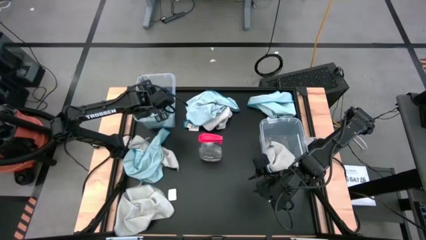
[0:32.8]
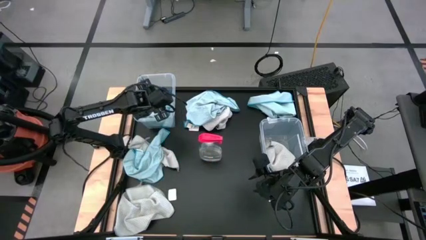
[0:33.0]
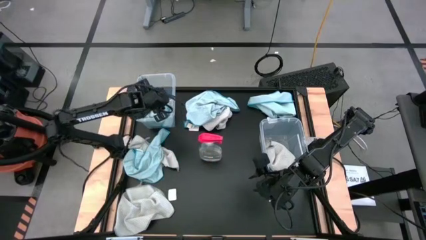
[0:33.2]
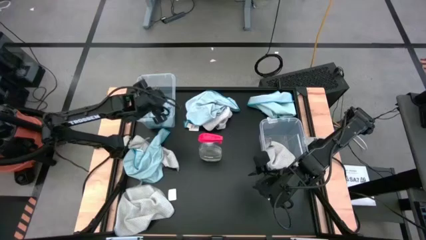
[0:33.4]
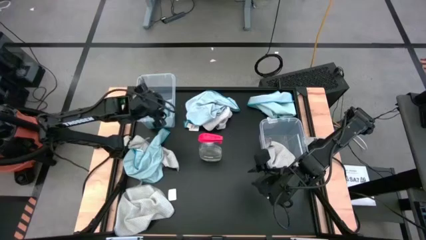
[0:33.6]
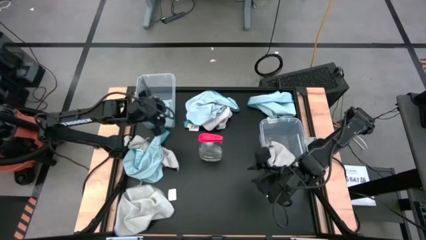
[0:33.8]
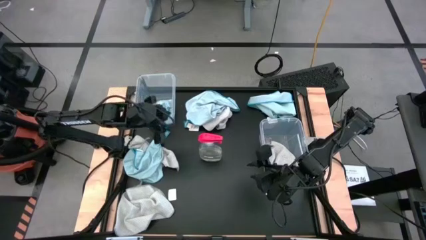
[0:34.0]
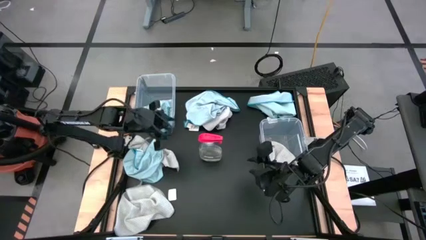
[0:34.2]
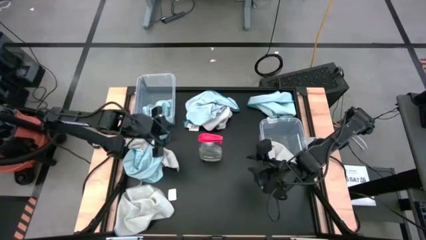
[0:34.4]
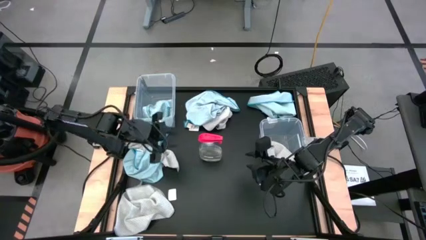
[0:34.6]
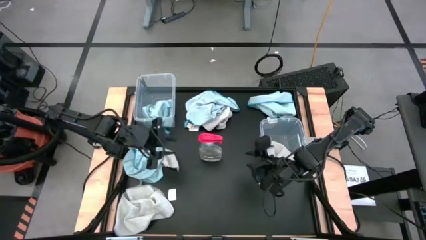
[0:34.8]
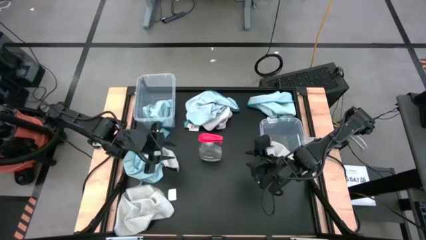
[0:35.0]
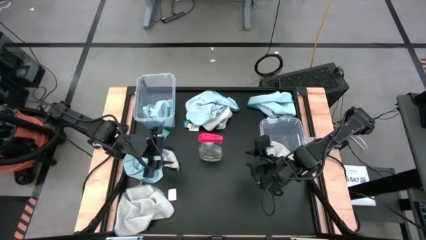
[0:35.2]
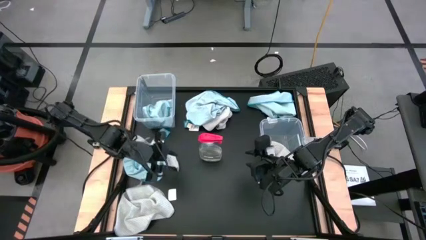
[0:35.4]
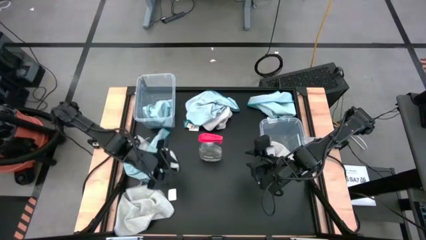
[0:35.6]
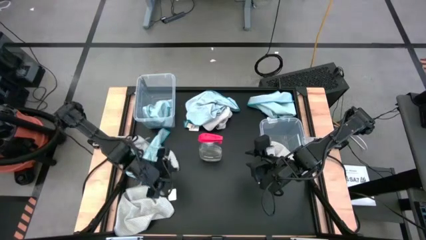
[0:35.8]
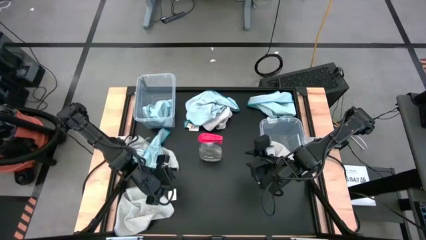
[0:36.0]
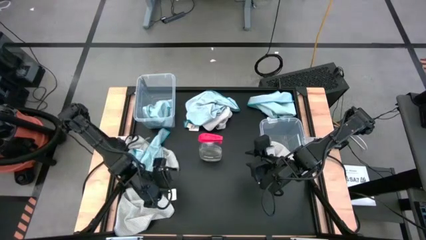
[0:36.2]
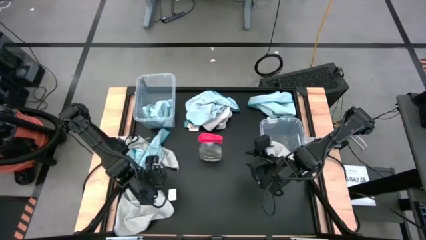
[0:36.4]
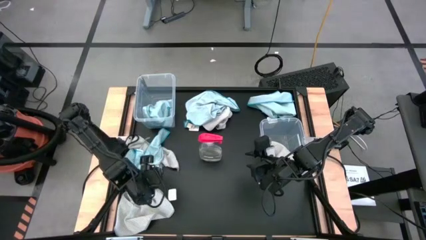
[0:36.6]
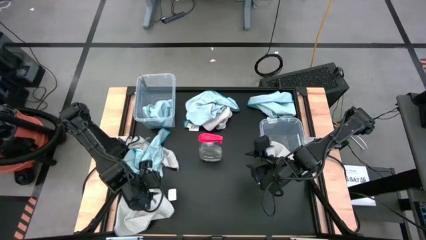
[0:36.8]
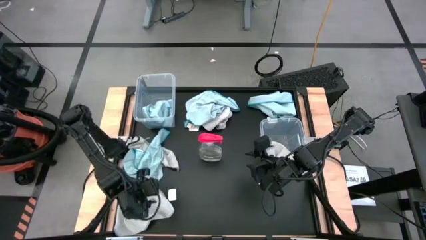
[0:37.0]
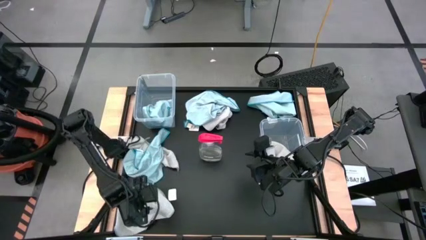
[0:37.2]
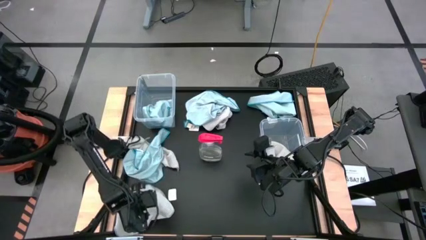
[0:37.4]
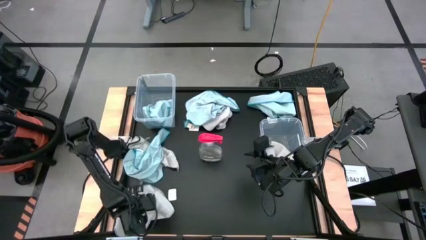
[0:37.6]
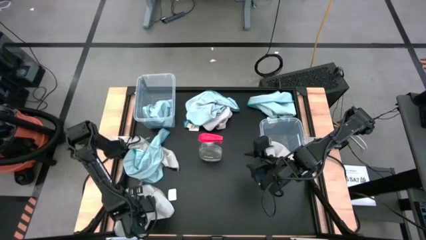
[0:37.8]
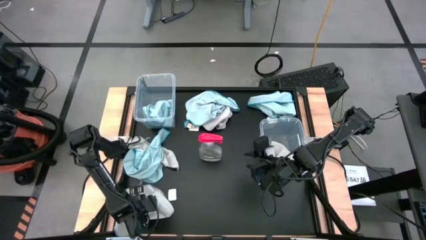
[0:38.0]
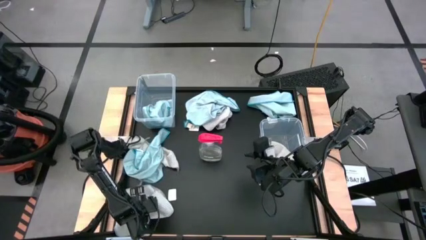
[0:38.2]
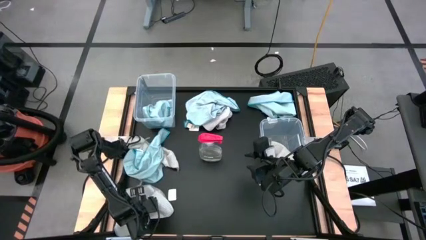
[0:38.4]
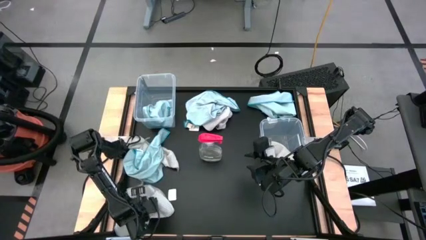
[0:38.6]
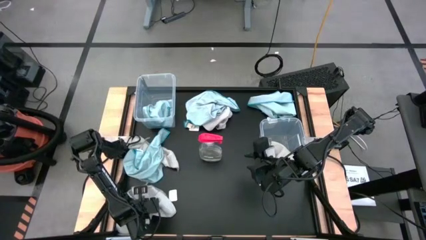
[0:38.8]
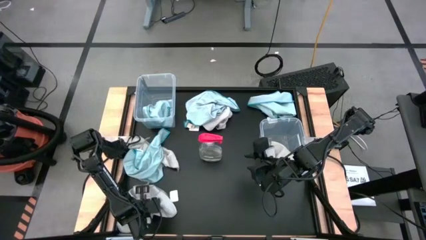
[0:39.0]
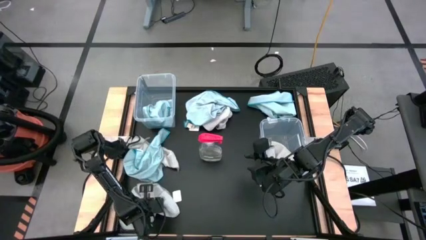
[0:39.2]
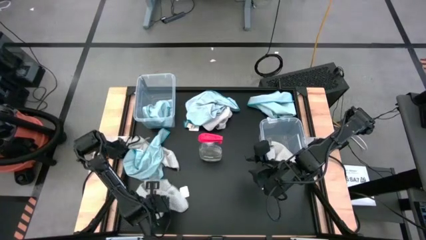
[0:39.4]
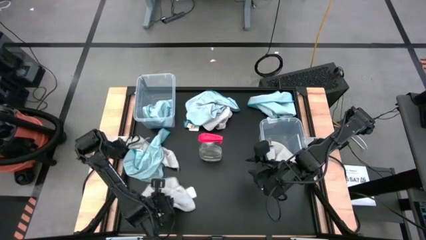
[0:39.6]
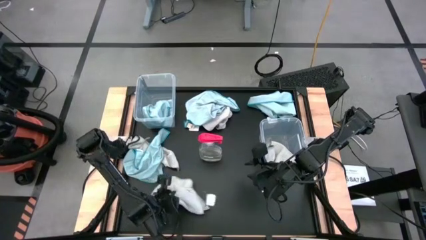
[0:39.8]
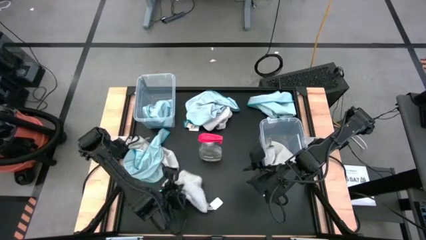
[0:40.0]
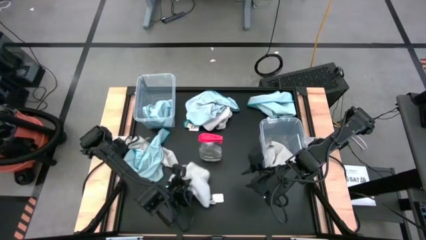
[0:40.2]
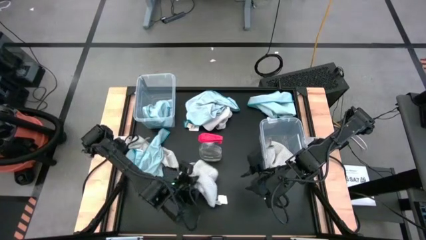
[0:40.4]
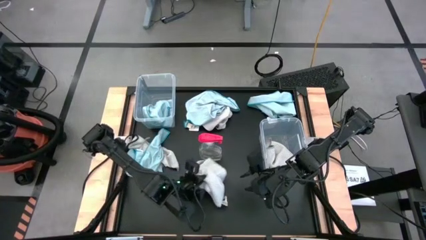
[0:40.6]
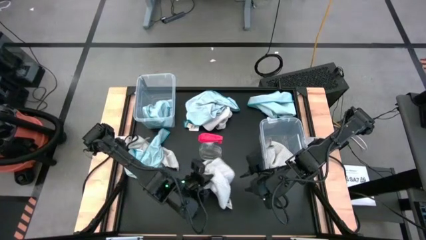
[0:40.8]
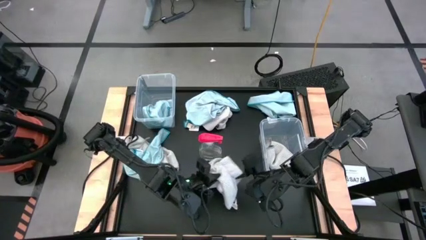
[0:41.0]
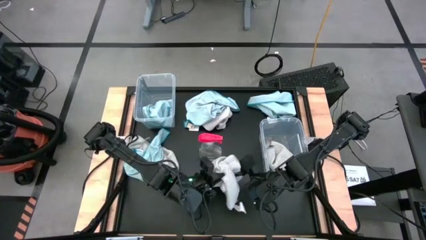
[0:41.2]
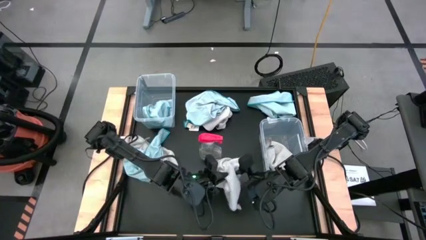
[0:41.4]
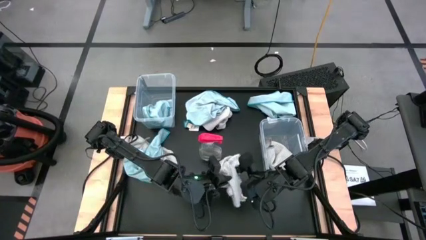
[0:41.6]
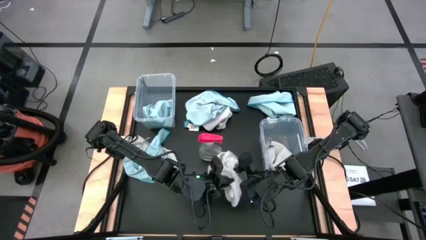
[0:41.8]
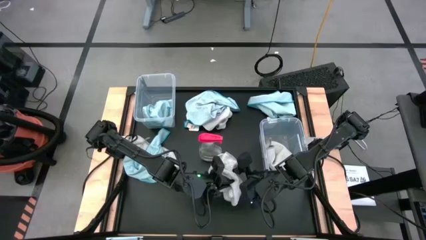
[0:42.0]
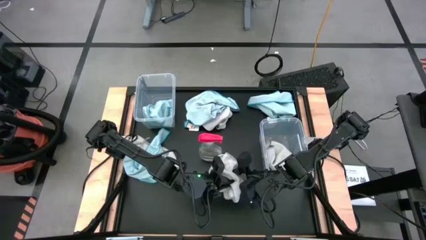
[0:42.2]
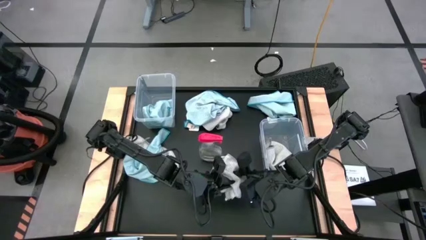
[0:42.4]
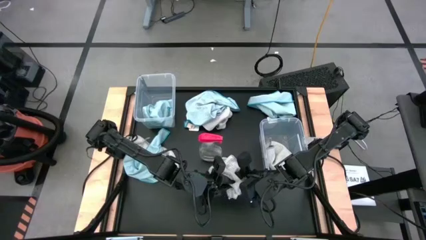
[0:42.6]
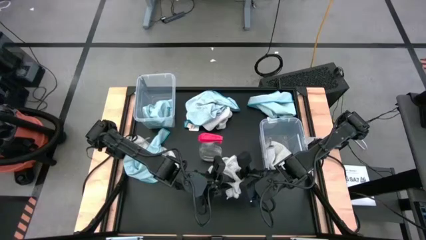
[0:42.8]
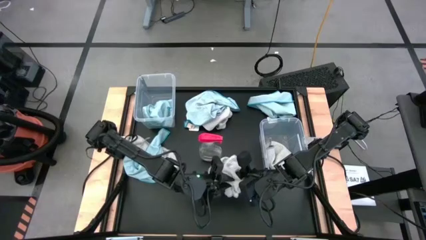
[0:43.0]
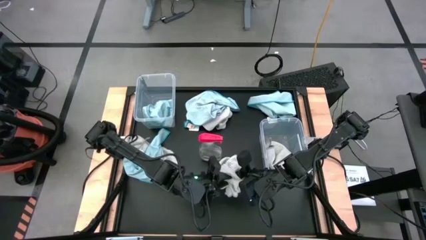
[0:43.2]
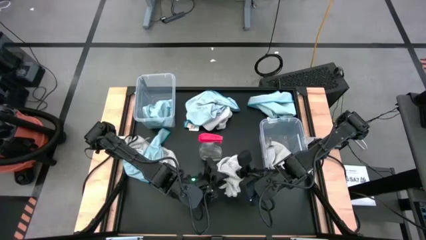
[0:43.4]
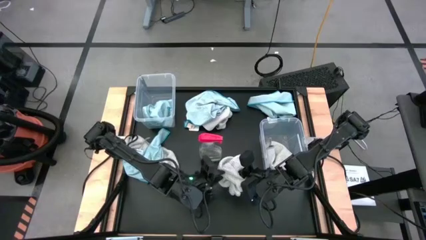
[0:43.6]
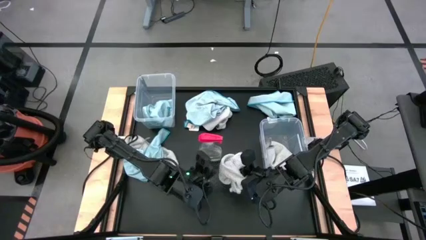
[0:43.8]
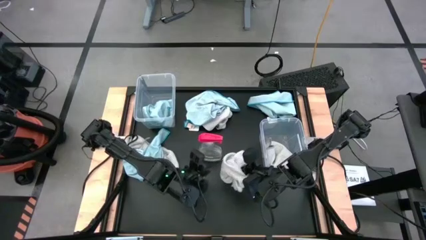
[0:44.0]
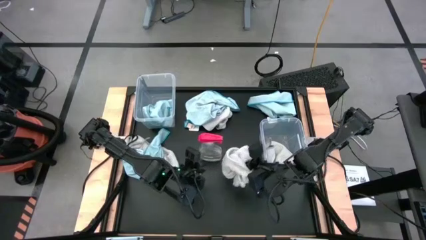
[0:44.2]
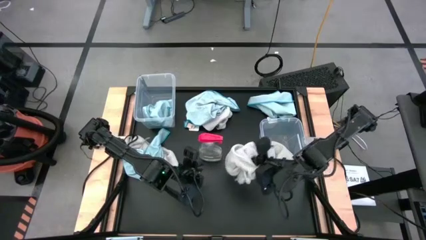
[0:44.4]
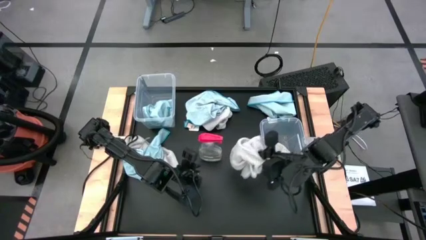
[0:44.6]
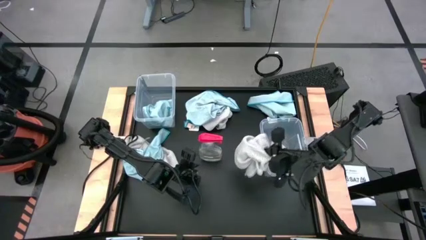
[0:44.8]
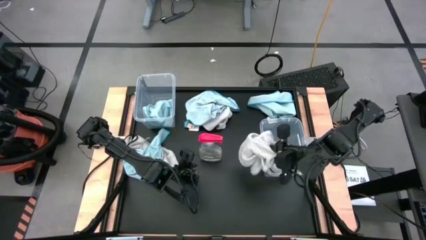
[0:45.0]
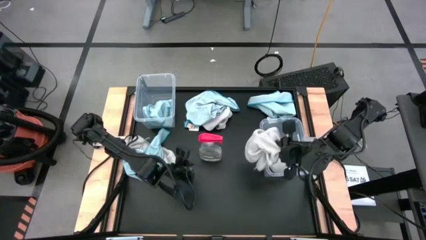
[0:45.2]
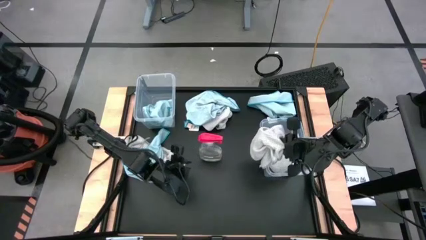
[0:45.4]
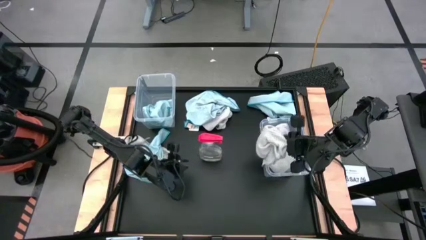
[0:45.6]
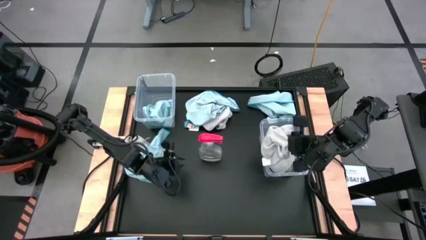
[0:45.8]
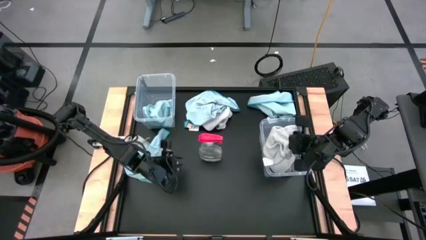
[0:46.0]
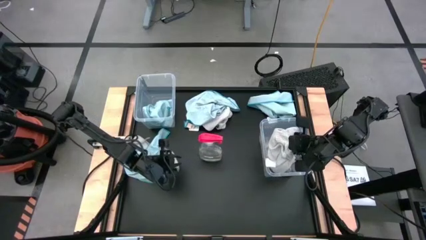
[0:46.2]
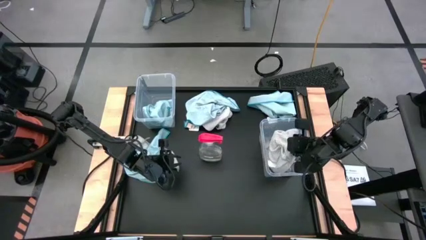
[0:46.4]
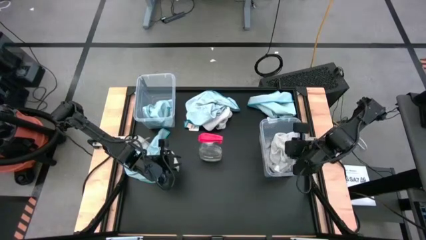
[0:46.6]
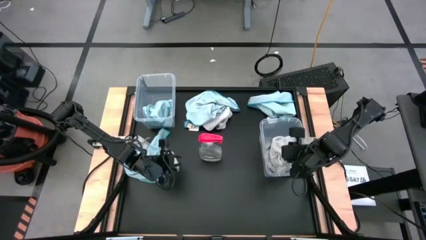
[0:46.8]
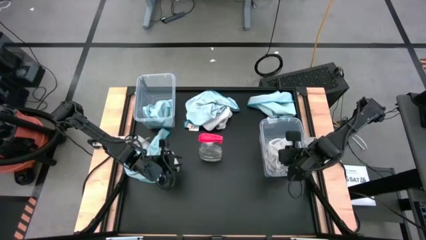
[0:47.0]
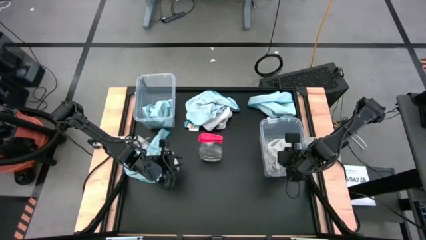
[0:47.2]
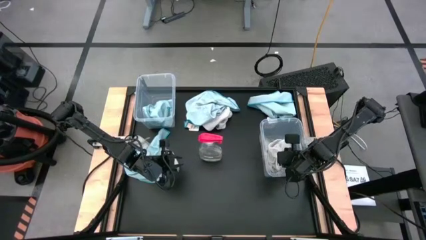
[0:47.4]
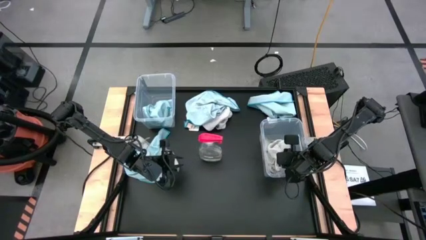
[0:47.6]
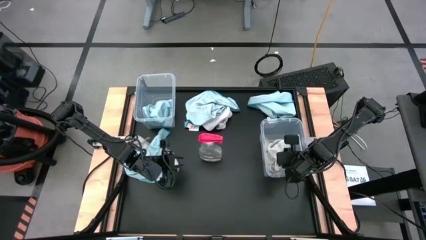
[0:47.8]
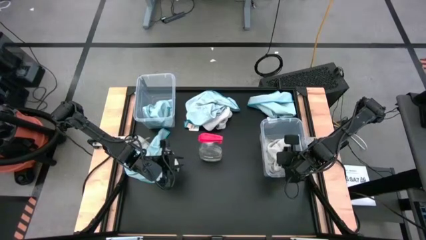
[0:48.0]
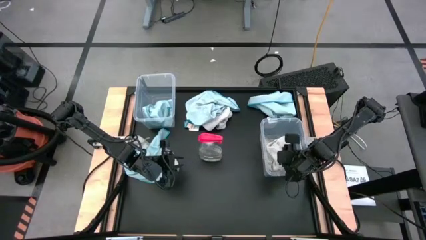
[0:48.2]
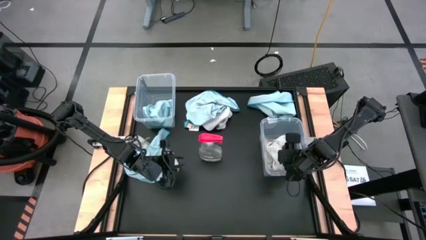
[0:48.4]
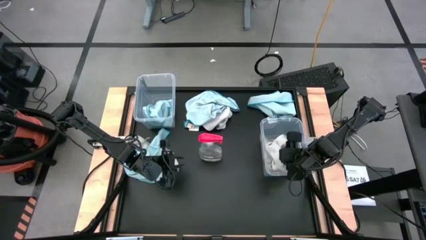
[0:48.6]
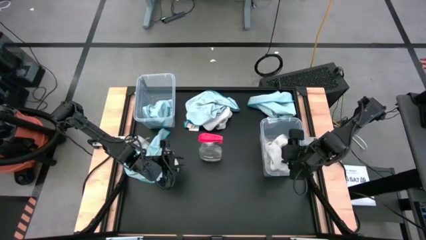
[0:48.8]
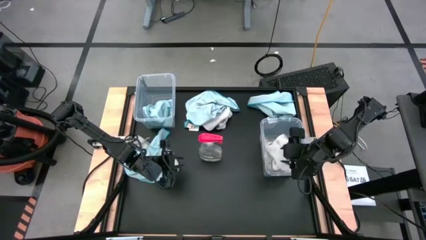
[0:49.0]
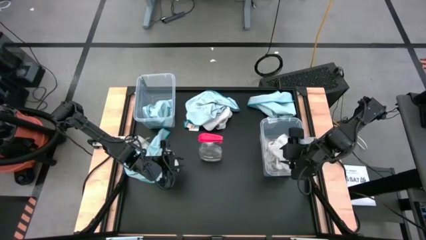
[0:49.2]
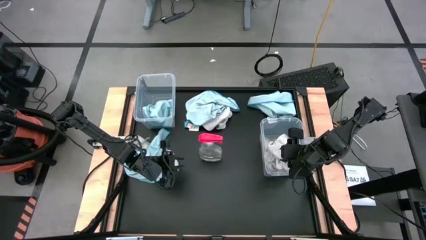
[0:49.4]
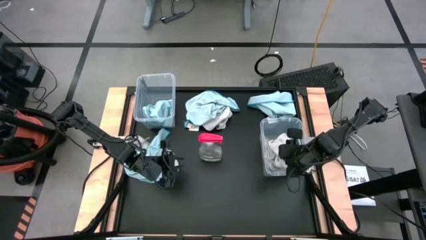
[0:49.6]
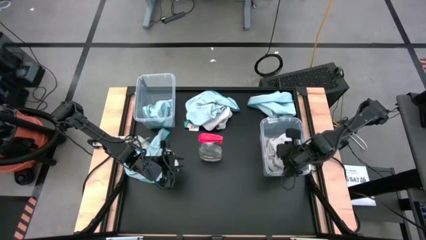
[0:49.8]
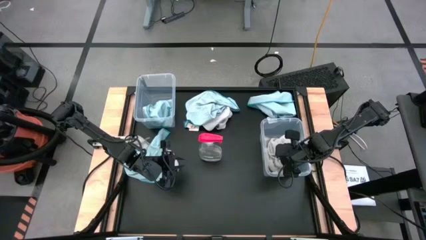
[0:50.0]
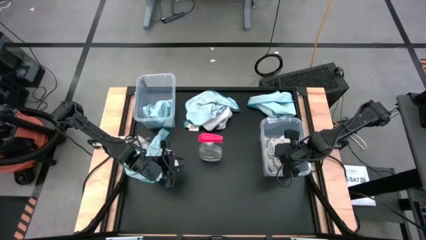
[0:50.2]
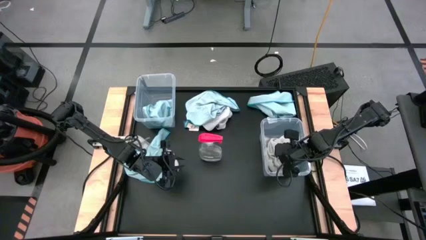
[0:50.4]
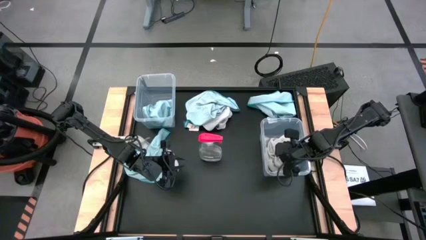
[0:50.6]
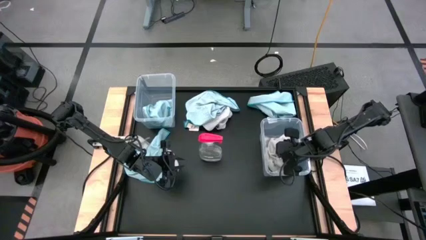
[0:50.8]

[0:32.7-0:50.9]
Task: Sort microfiber towel by color & place in baskets
Put the bottom gray towel into the right transparent bin
